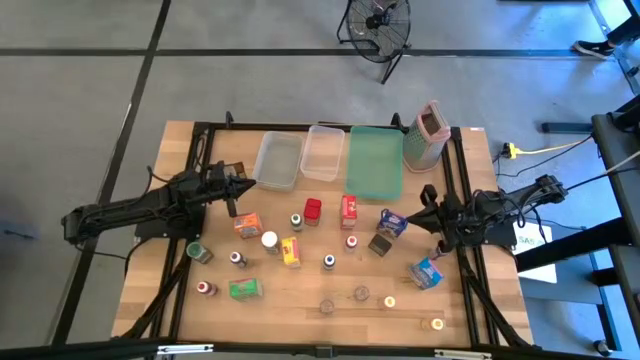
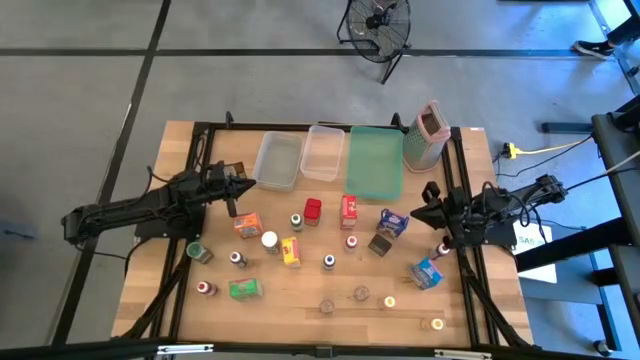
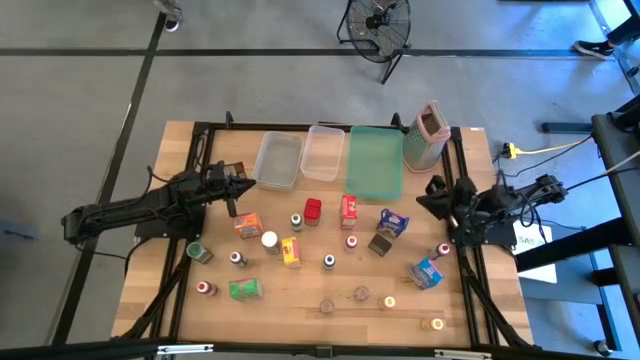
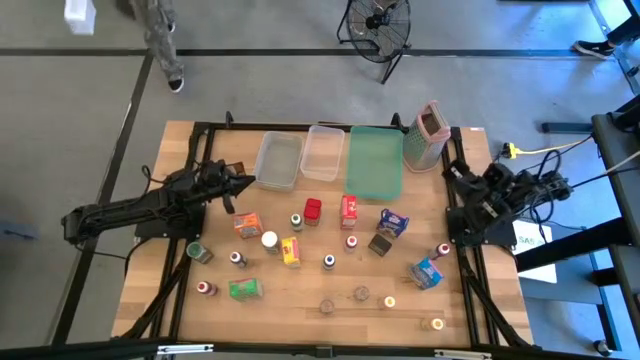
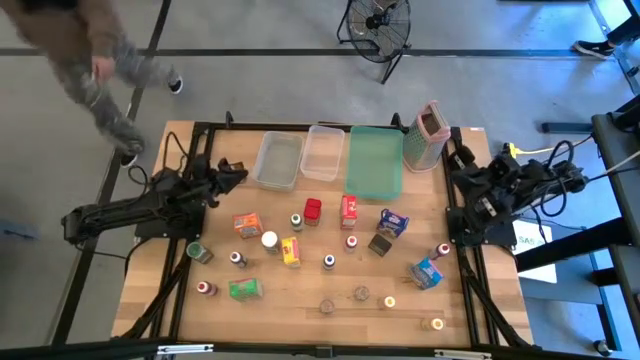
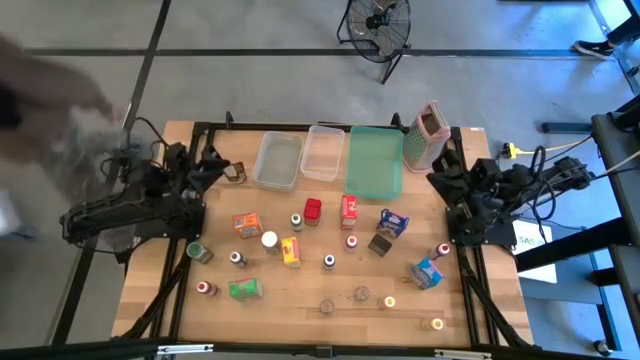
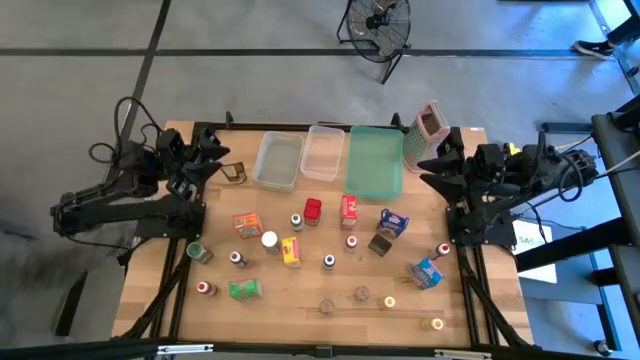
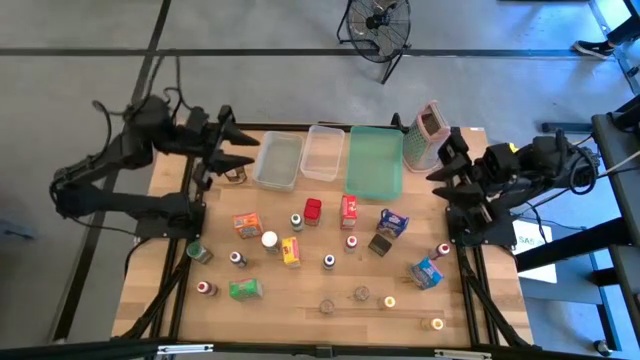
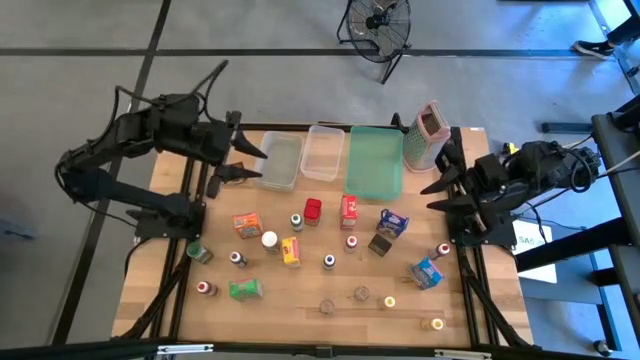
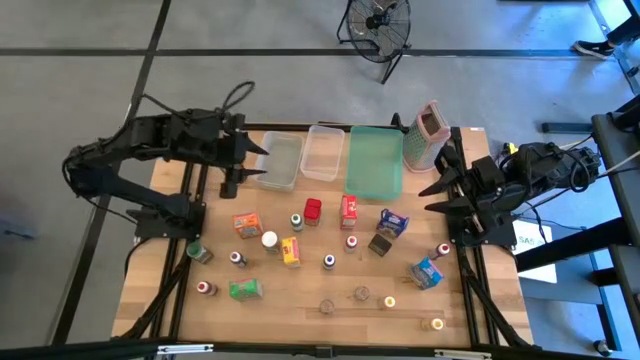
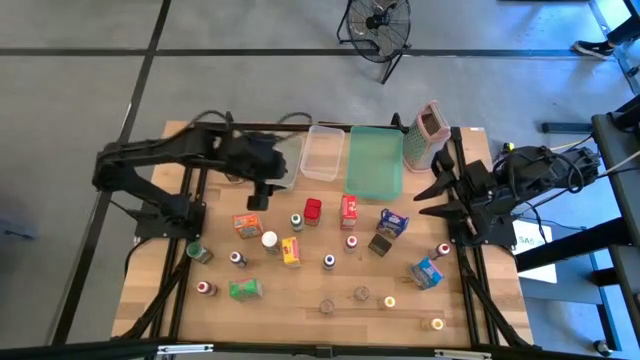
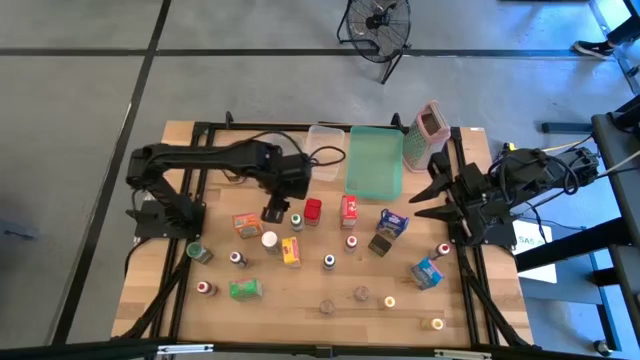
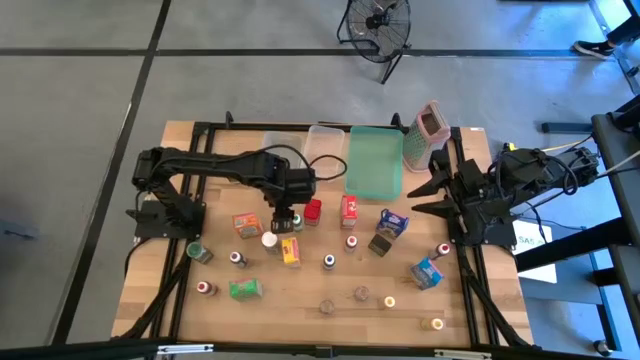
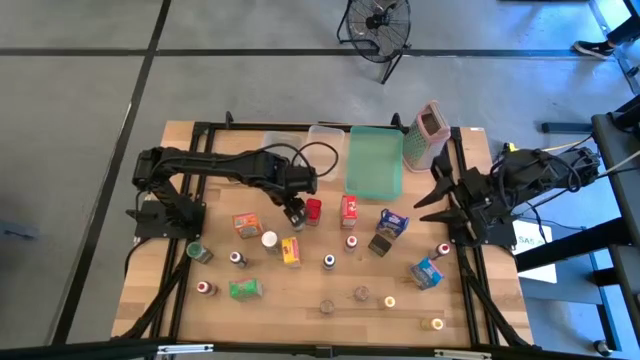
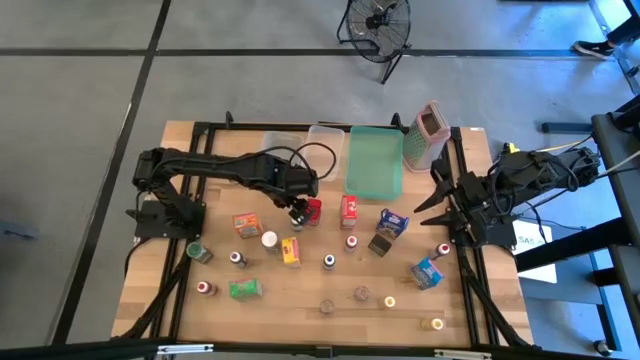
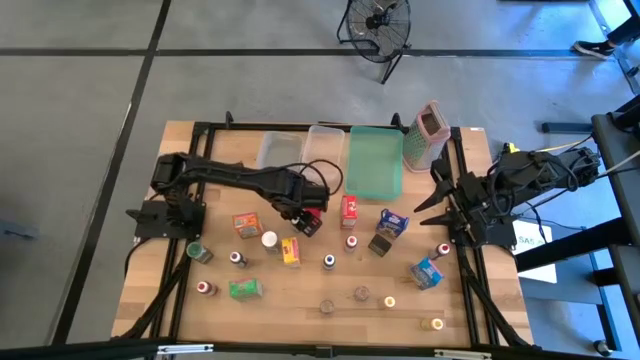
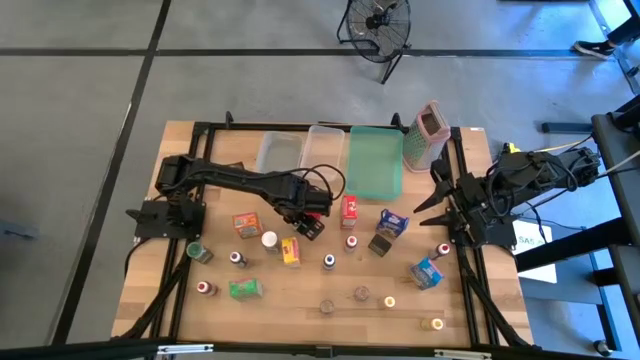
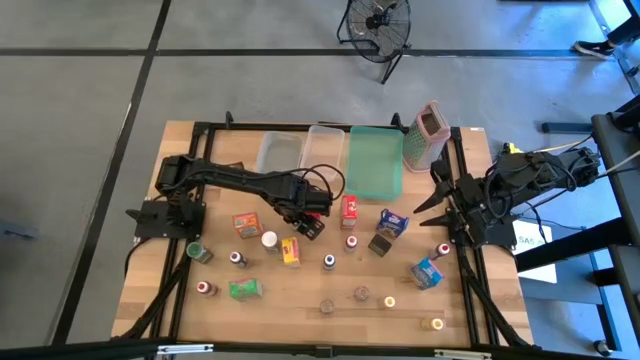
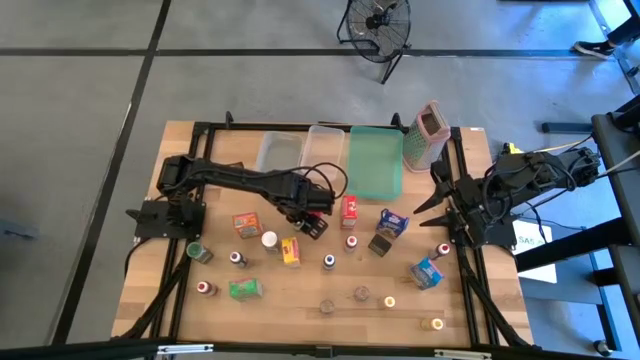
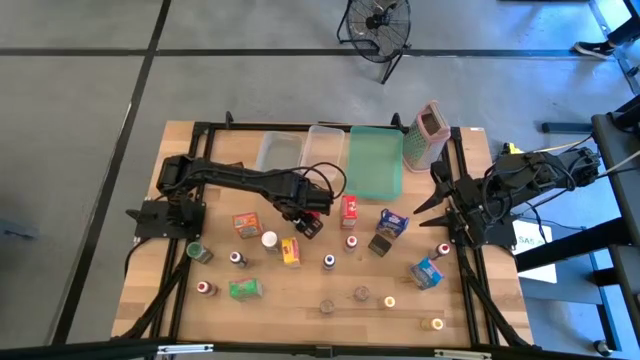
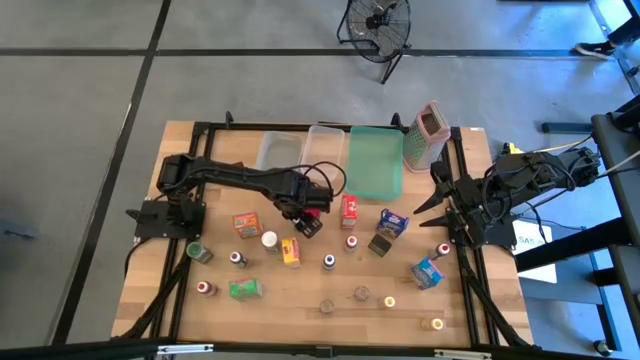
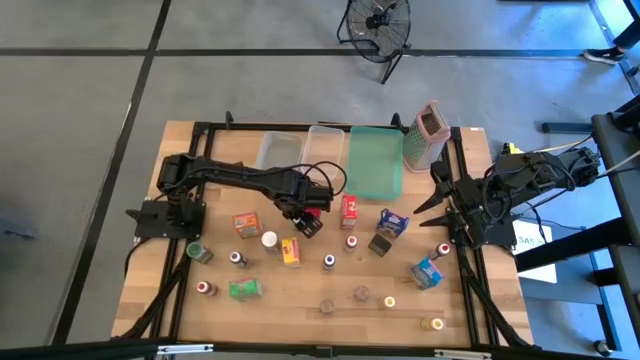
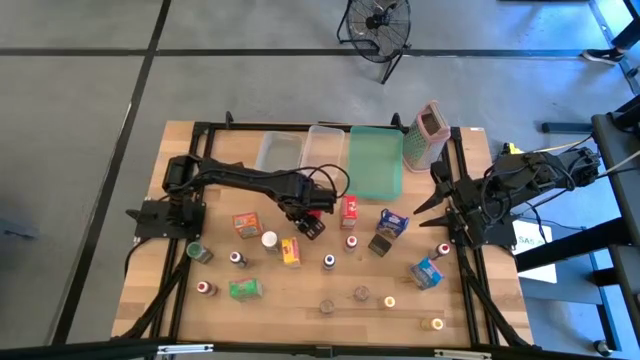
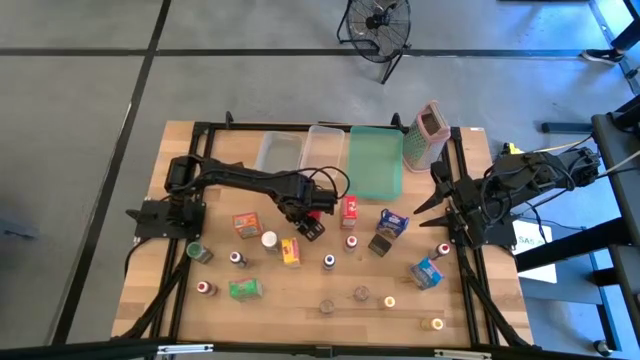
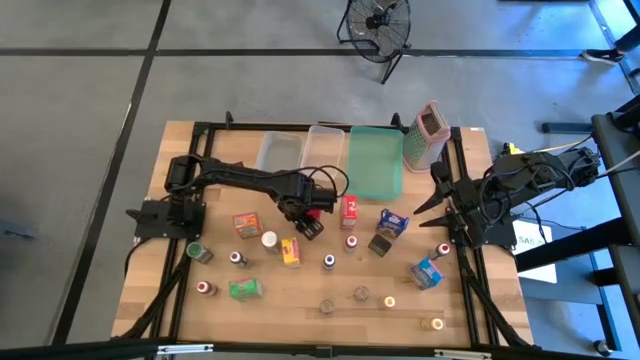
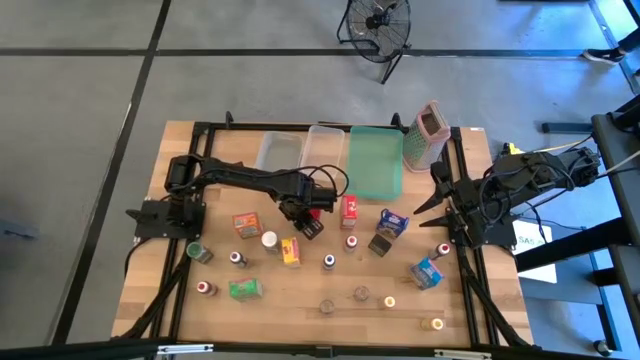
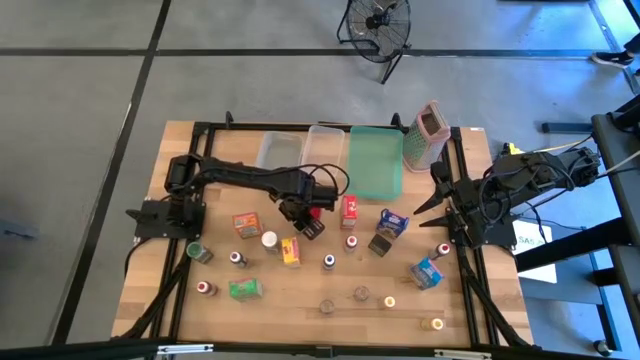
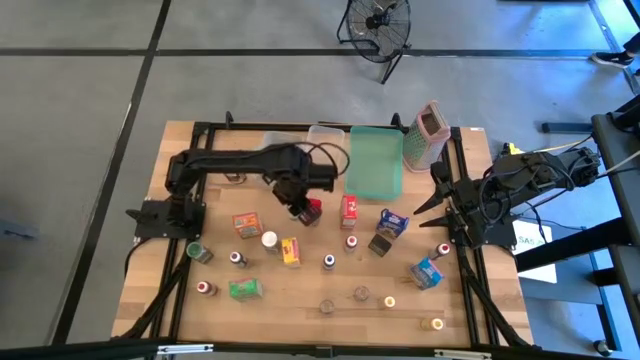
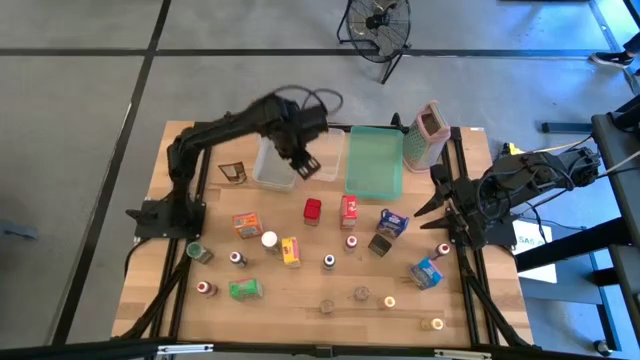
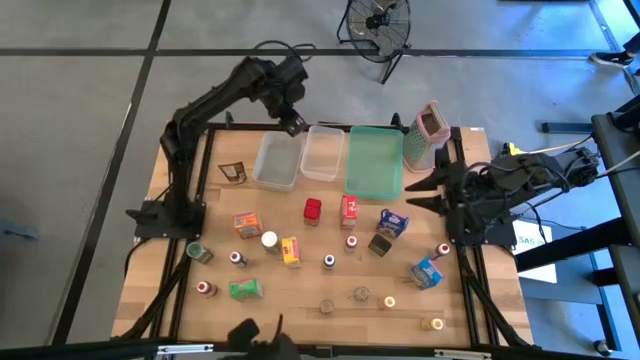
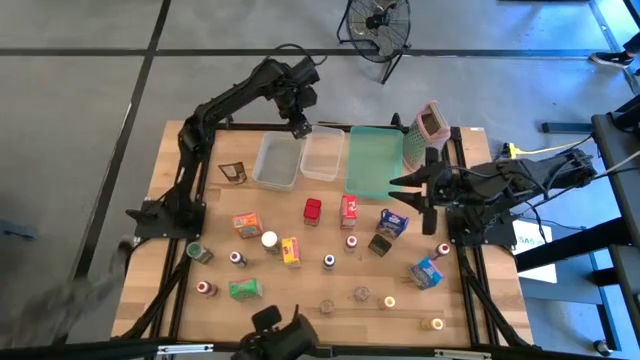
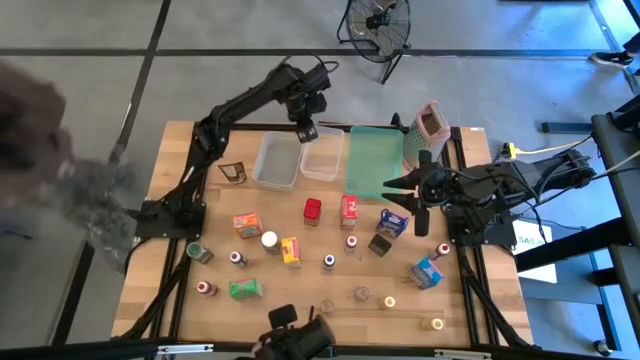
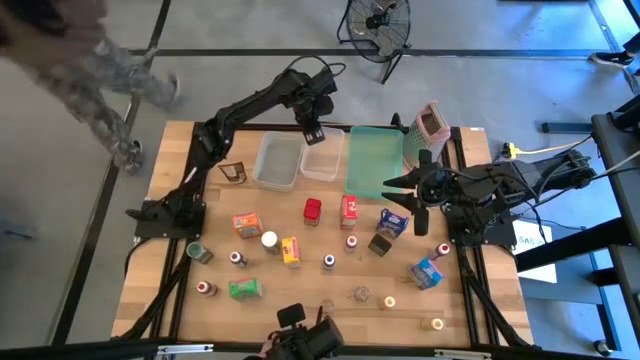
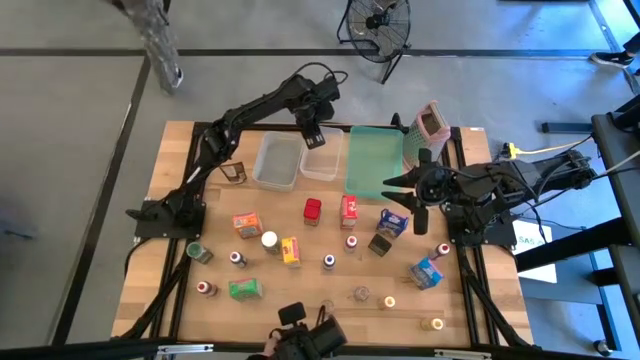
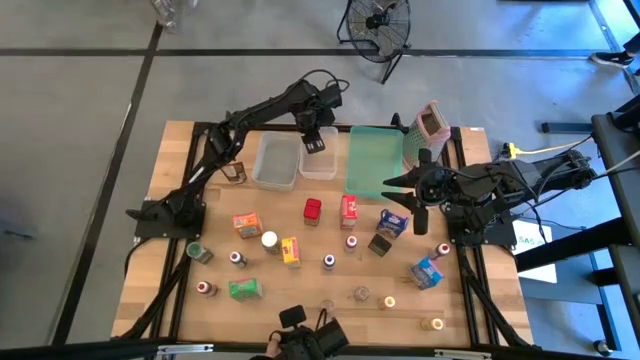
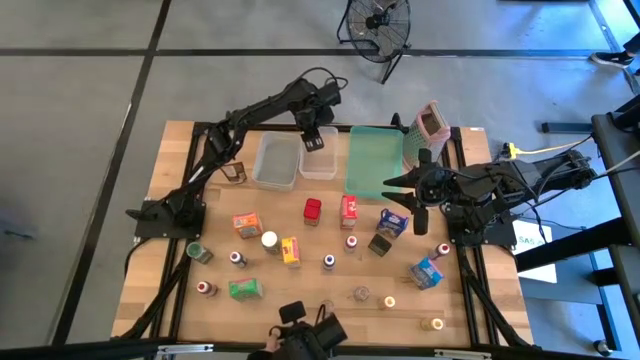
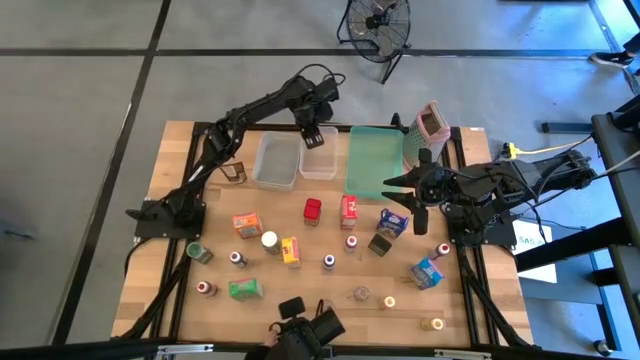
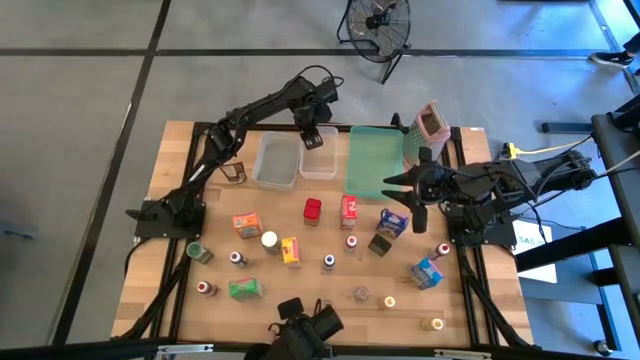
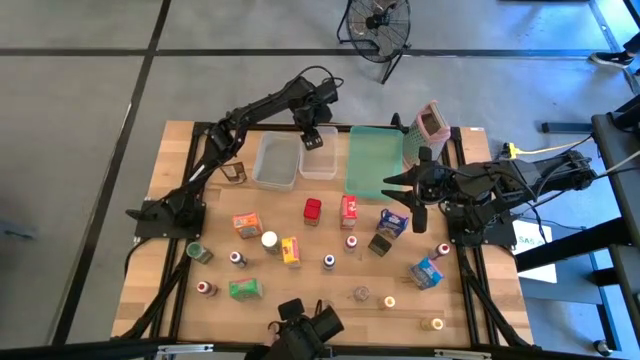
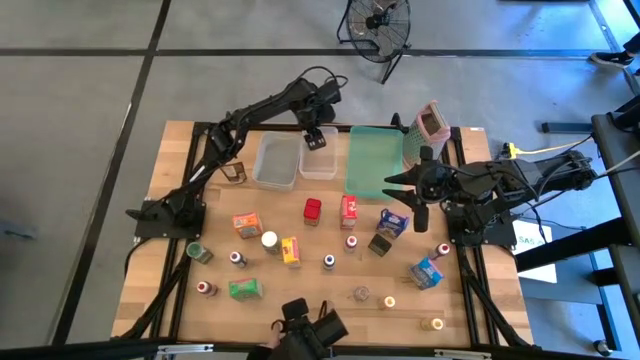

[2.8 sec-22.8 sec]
Task: Pick & Place Kitchen Items
Put the green food coloring bottle into the transparent bin
